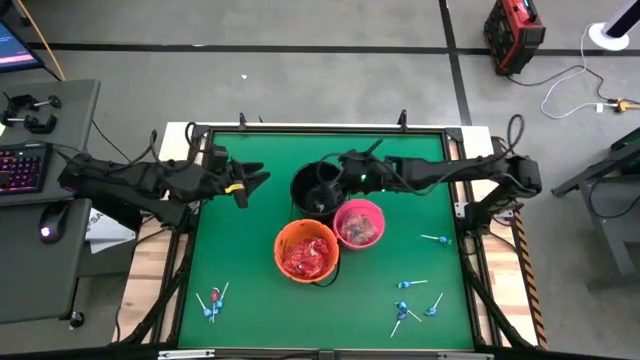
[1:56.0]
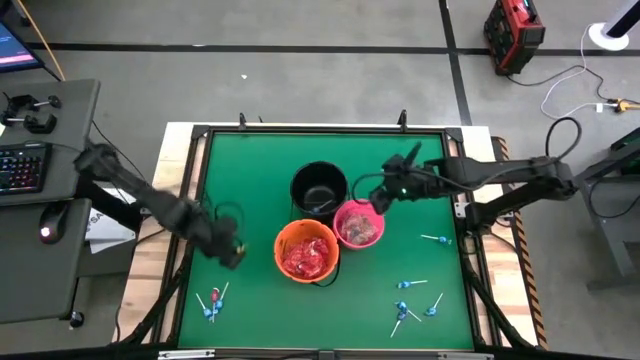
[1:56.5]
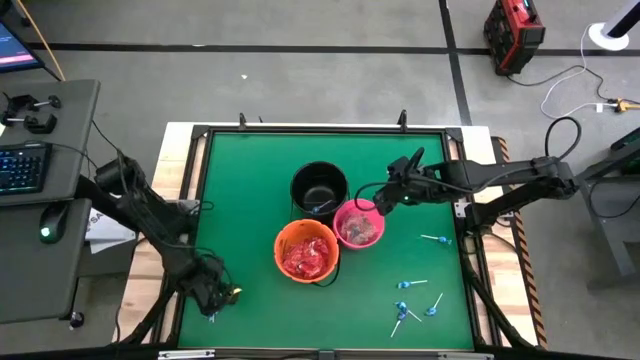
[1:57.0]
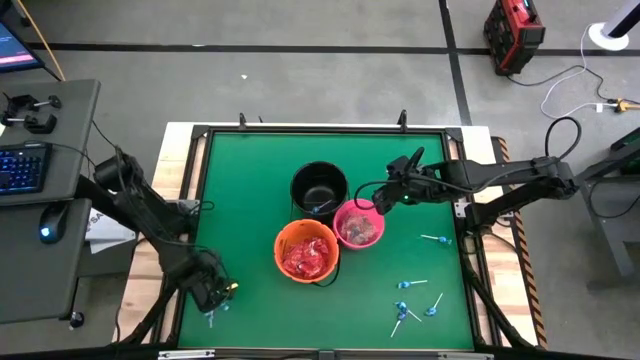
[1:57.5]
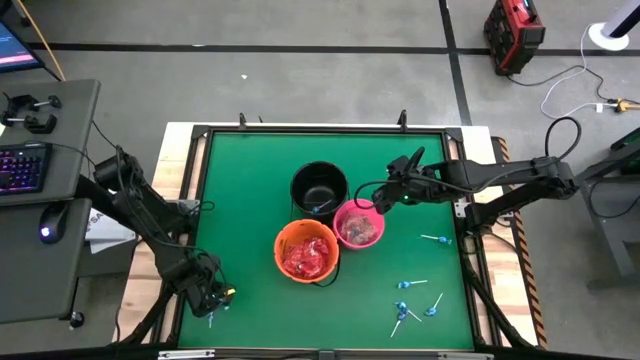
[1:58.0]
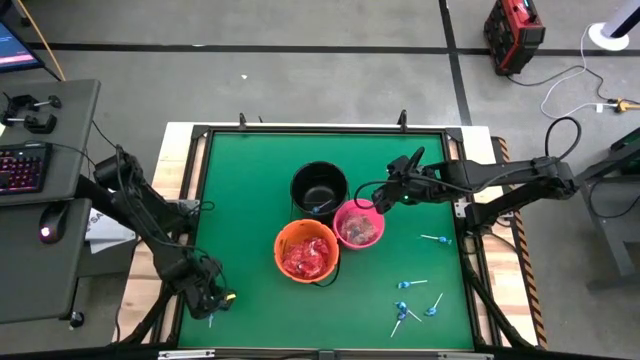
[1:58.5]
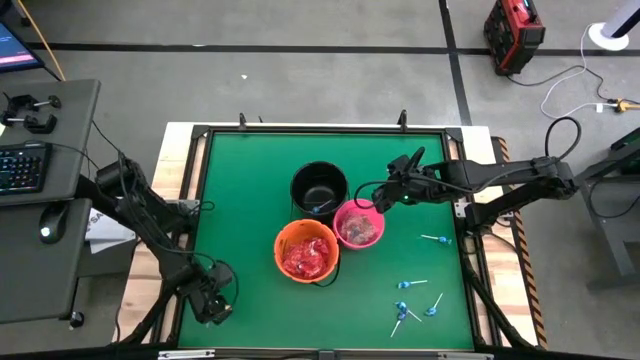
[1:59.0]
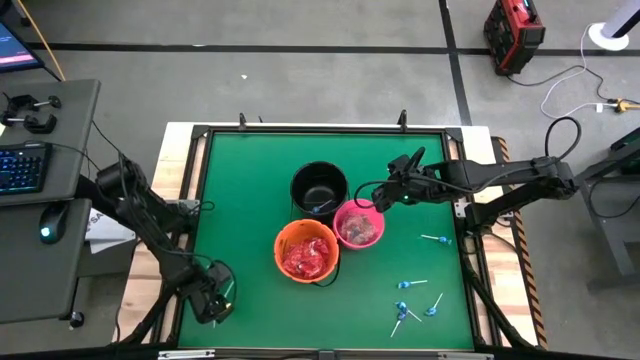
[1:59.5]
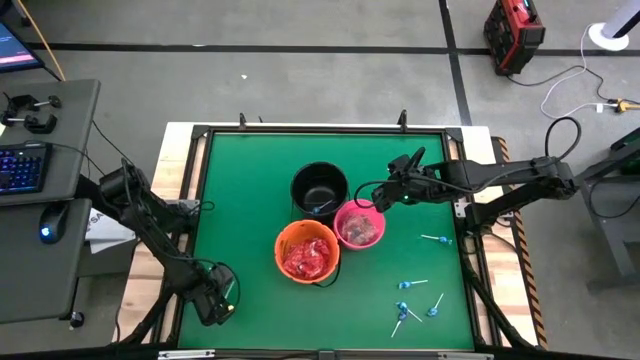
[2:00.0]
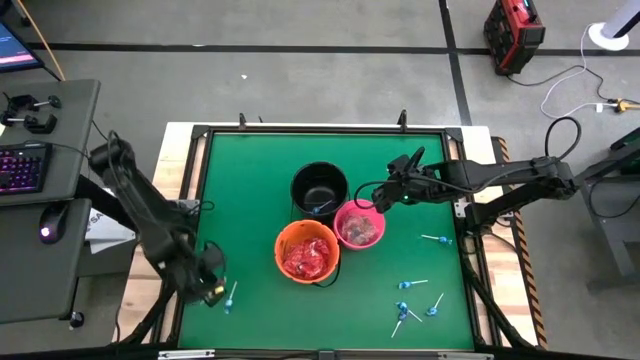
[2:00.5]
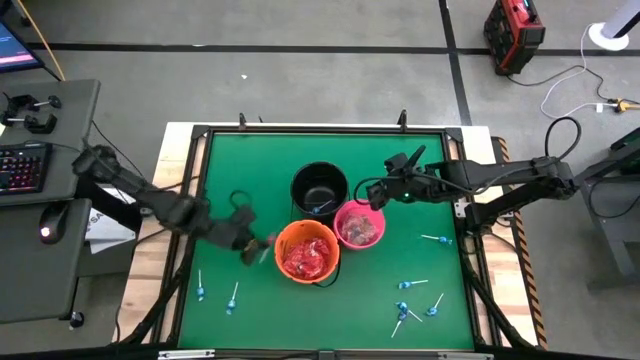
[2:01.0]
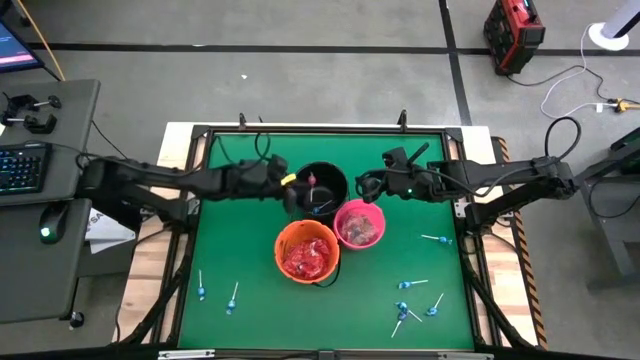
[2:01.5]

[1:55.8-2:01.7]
Task: Sort candy by brand, put in halloween buckets
Put the red lollipop into the black bucket

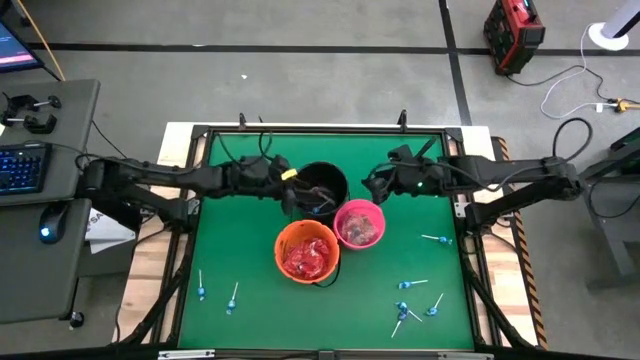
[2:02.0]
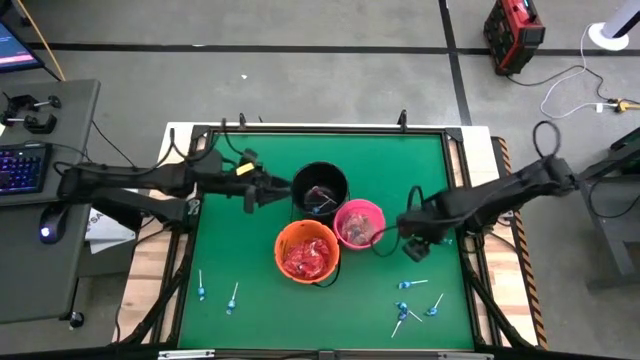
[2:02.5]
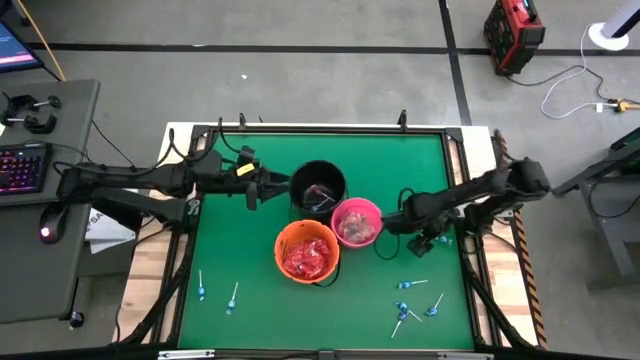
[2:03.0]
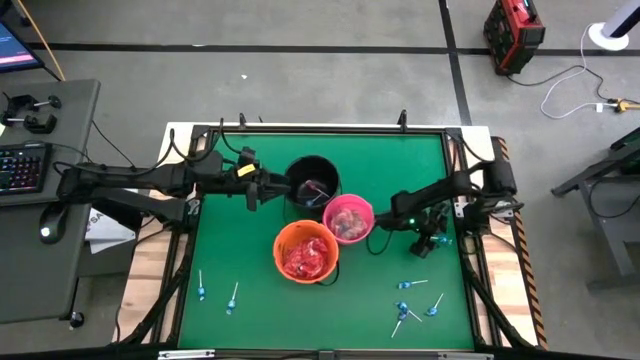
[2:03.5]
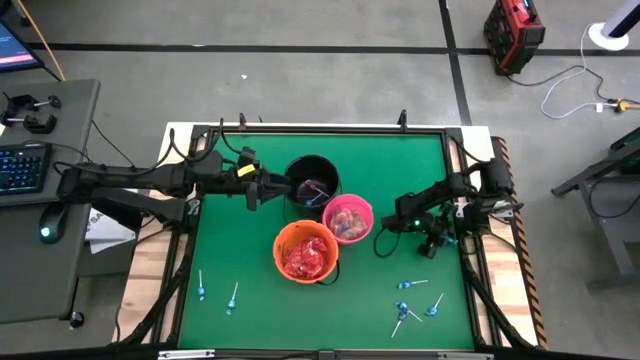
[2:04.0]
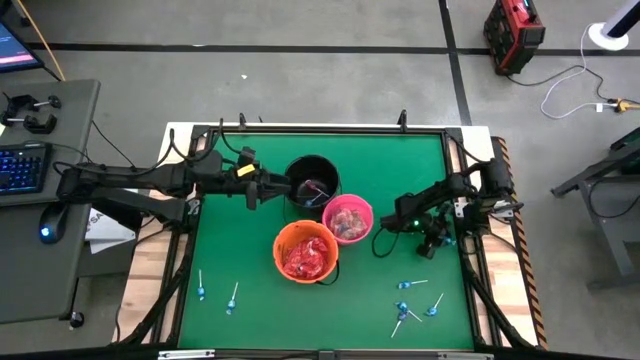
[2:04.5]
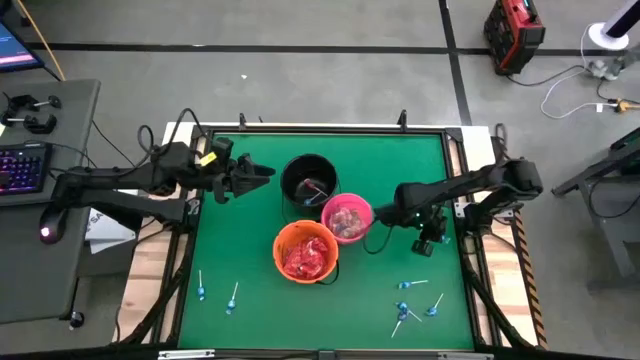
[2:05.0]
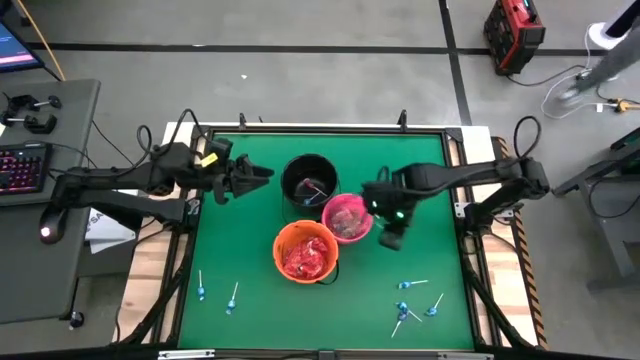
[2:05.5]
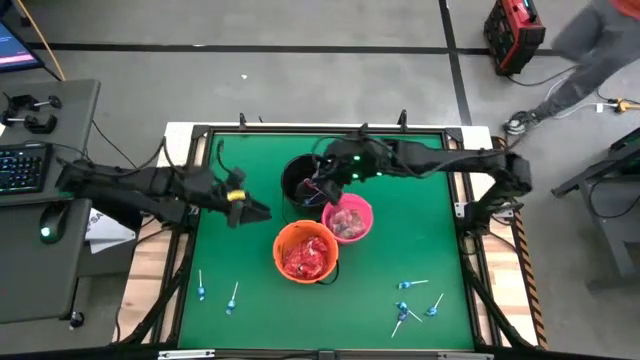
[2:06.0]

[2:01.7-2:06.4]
Put the blue lollipop into the black bucket

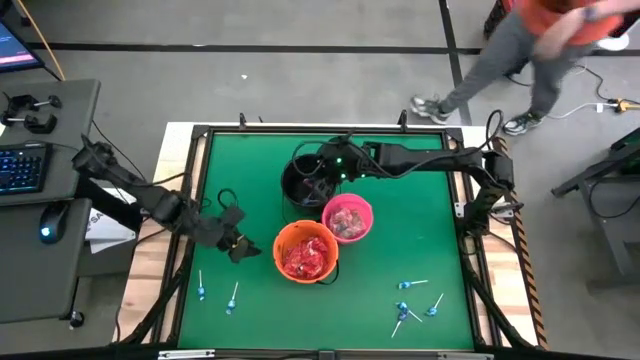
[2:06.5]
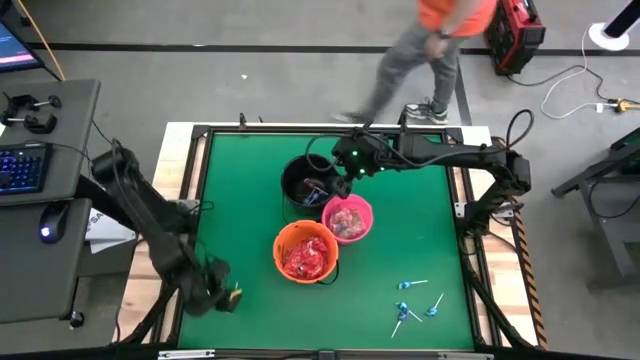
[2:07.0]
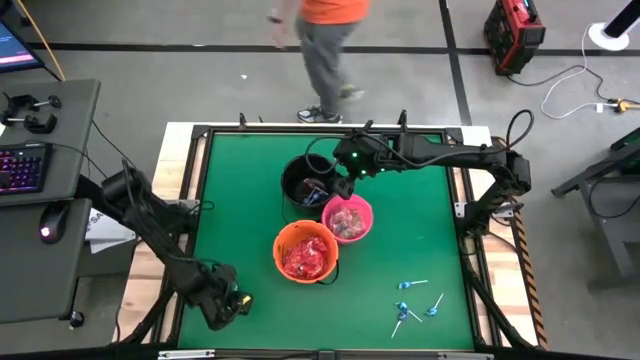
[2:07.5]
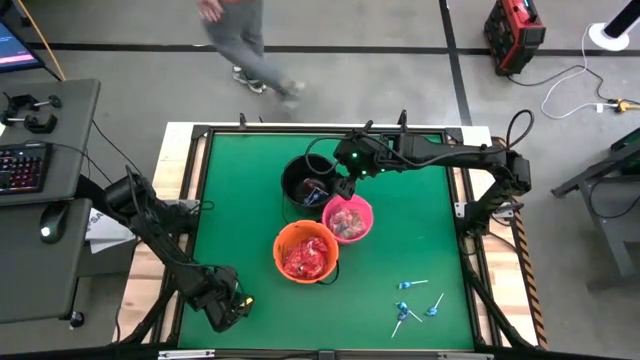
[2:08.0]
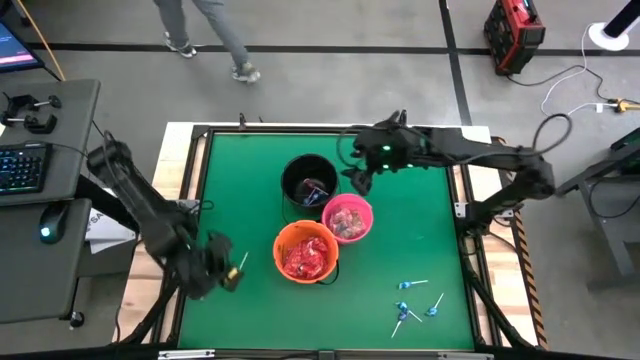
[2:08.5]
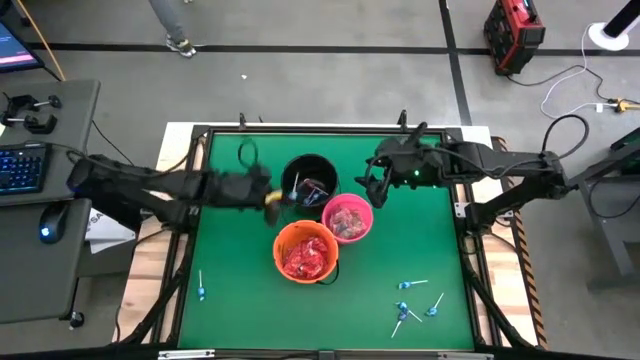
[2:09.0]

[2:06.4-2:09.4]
Put the blue lollipop into the black bucket

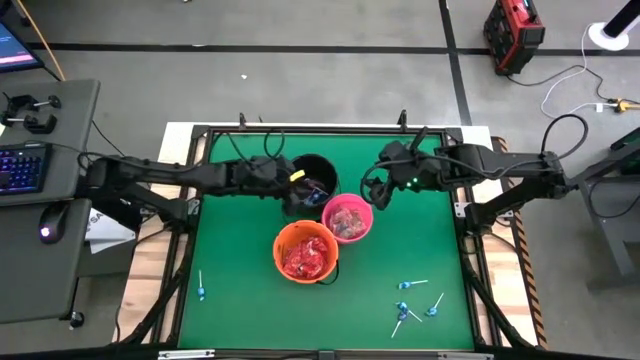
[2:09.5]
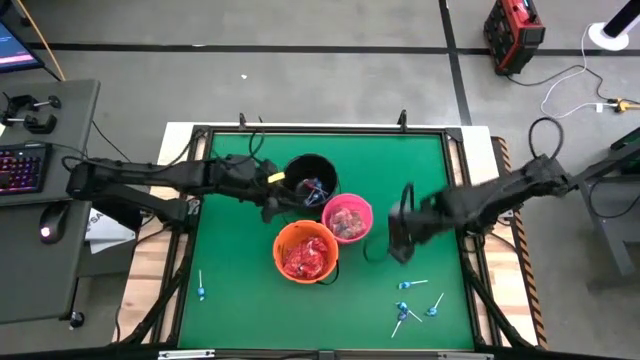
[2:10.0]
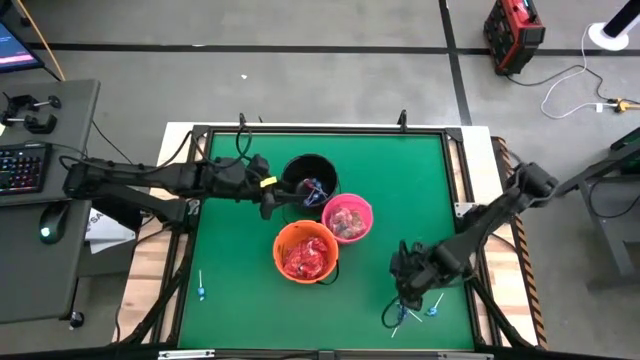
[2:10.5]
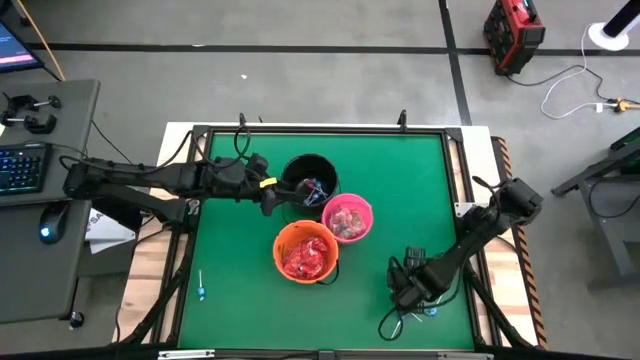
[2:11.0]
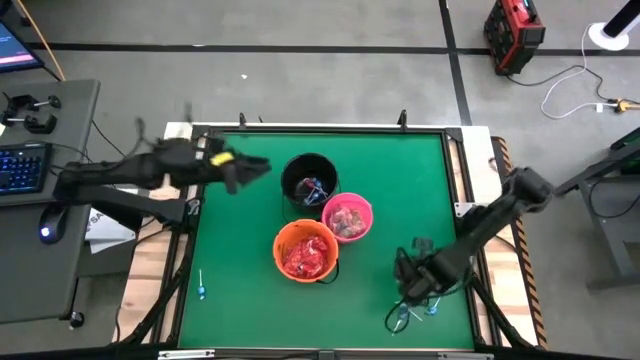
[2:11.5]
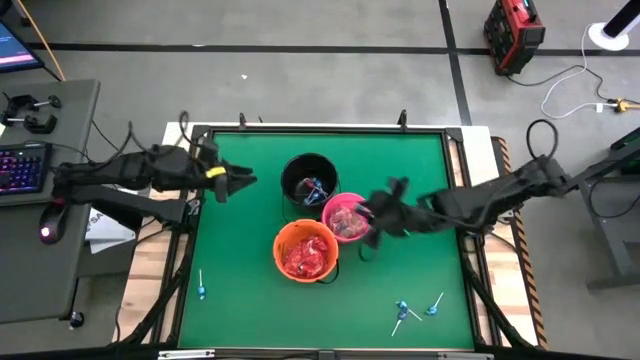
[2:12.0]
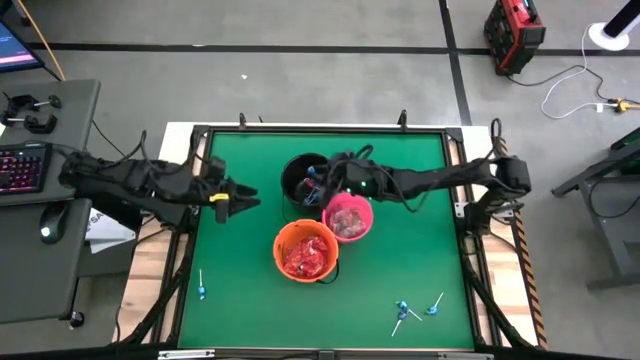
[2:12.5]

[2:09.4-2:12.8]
Put the blue lollipop into the black bucket

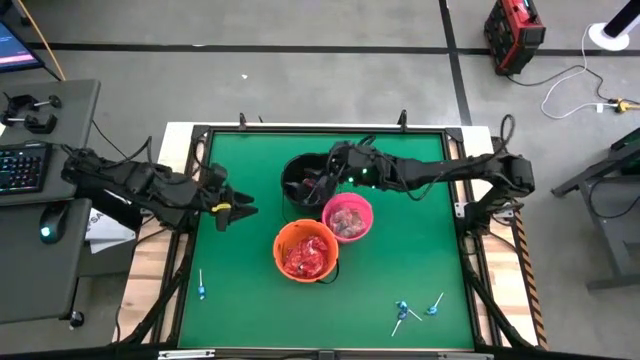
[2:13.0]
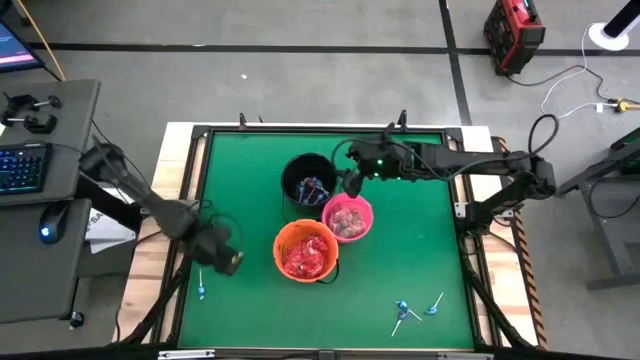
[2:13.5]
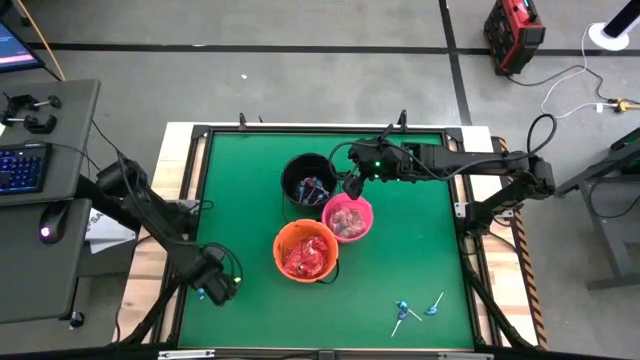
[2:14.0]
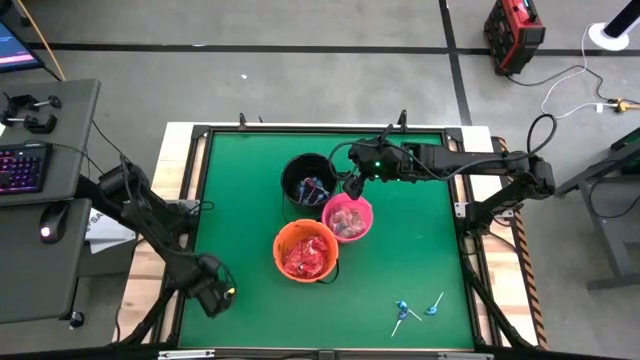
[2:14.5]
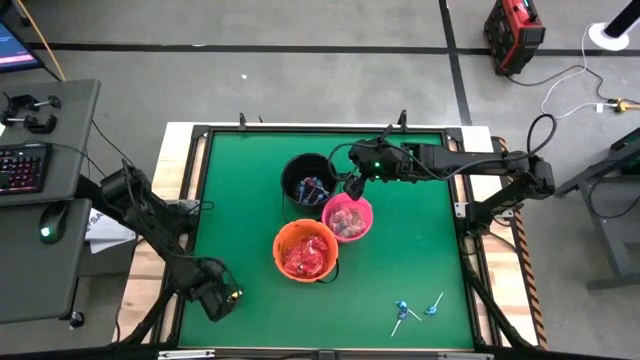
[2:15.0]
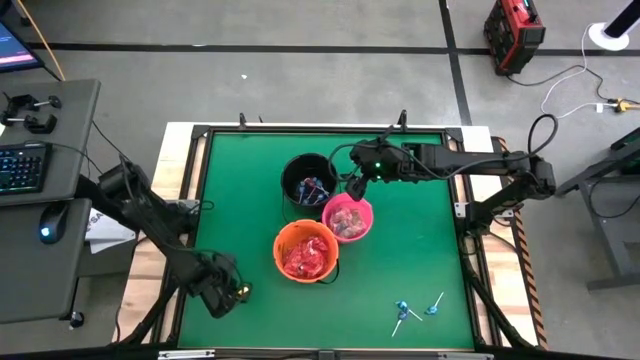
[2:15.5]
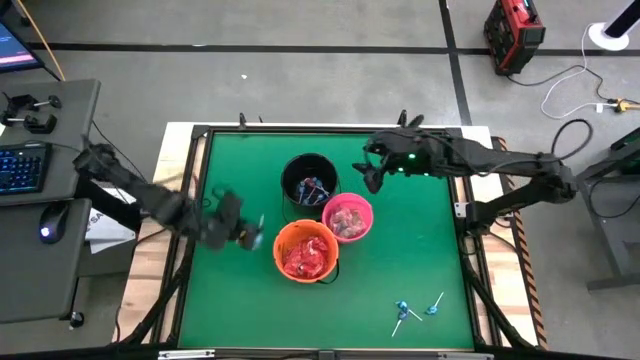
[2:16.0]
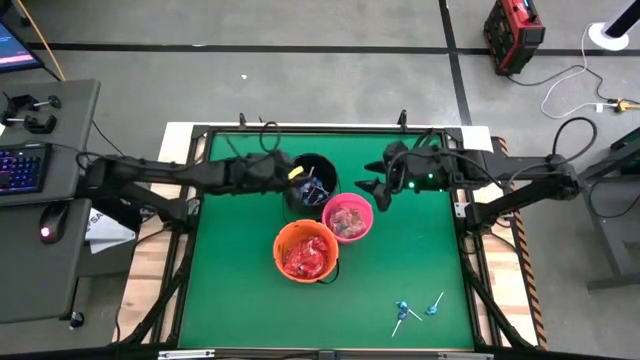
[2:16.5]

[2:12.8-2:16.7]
Put the blue lollipop into the black bucket
